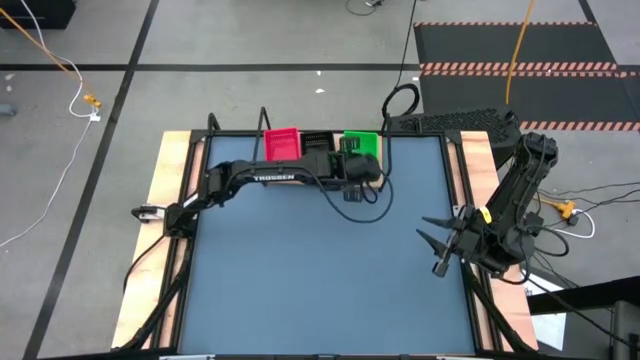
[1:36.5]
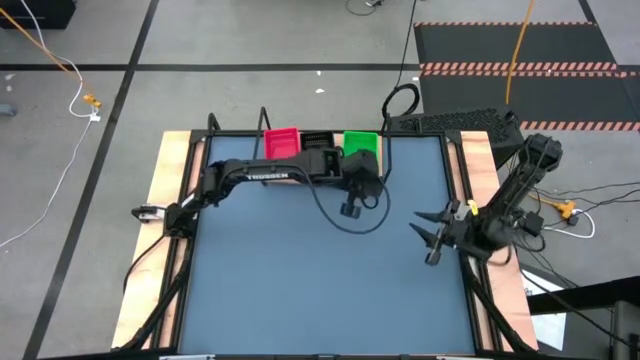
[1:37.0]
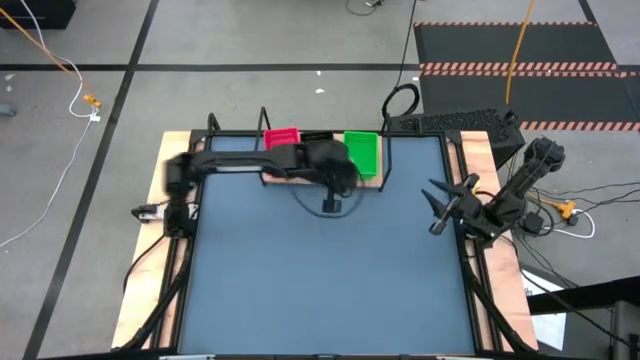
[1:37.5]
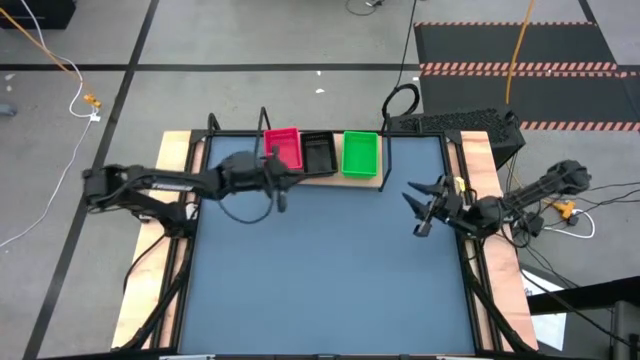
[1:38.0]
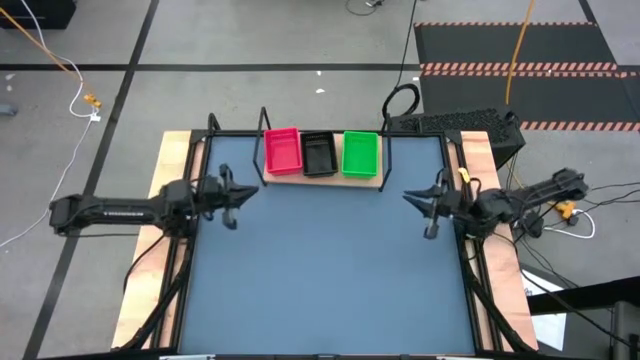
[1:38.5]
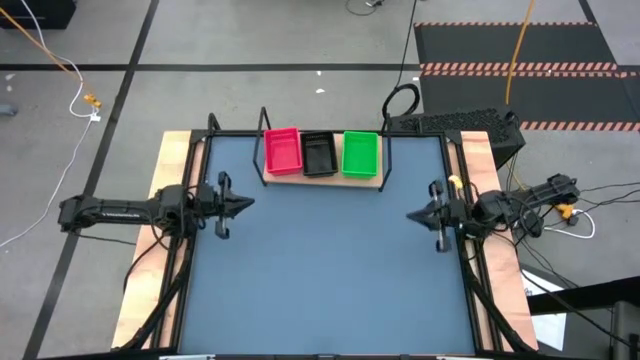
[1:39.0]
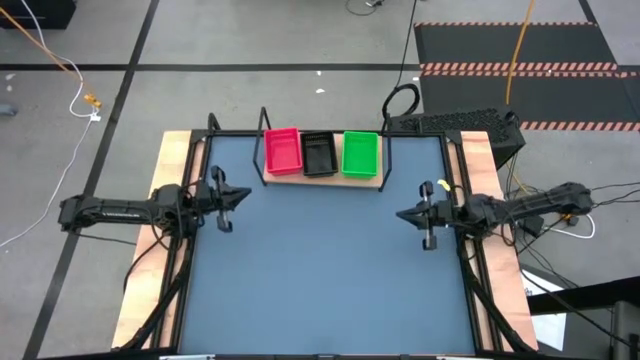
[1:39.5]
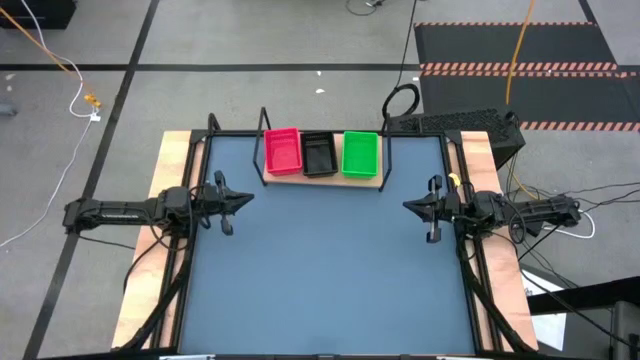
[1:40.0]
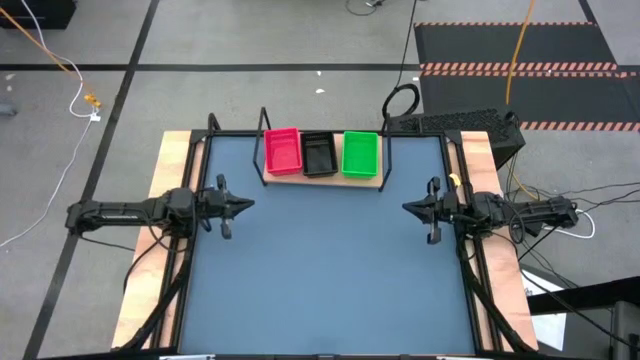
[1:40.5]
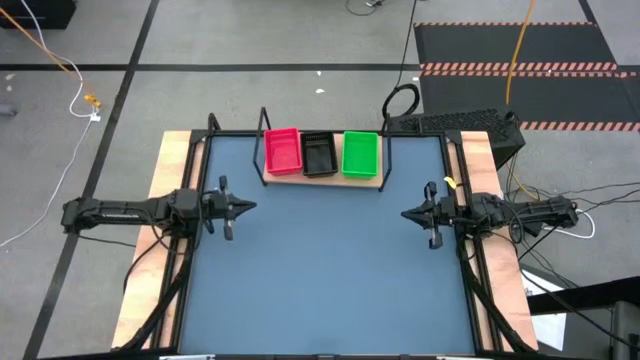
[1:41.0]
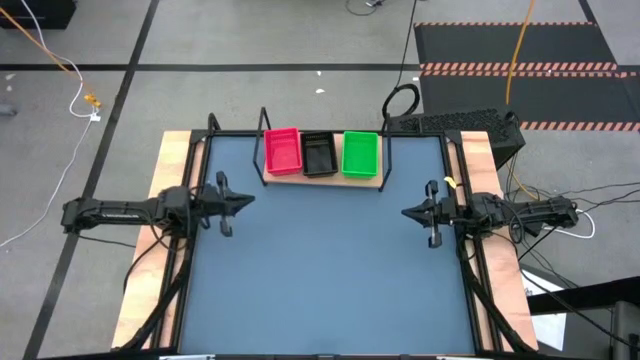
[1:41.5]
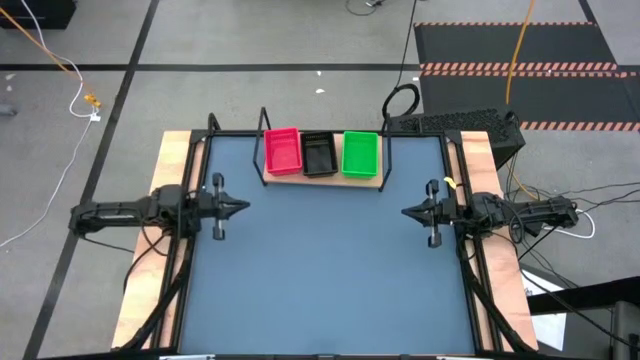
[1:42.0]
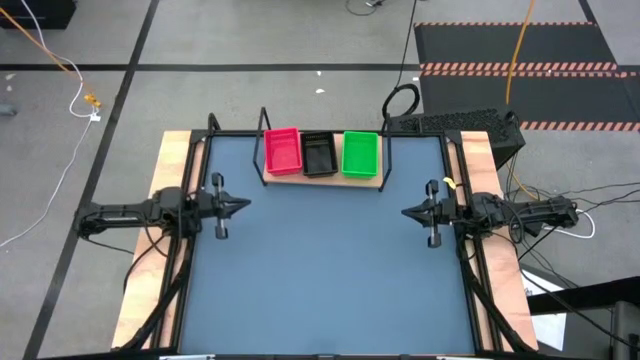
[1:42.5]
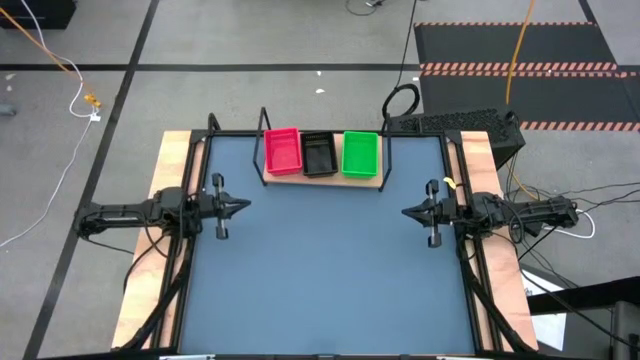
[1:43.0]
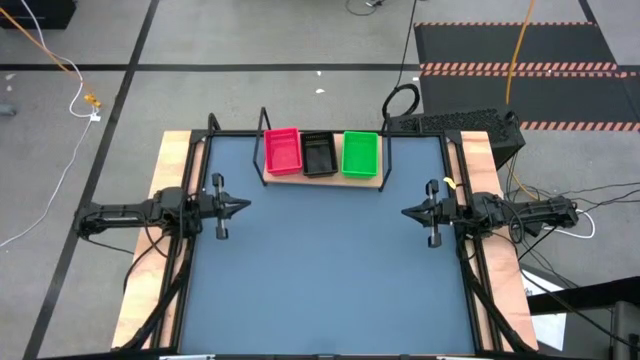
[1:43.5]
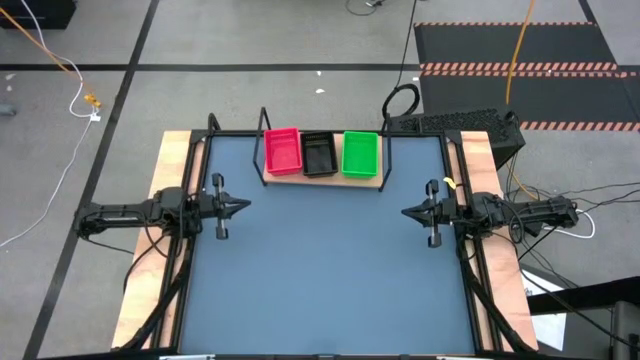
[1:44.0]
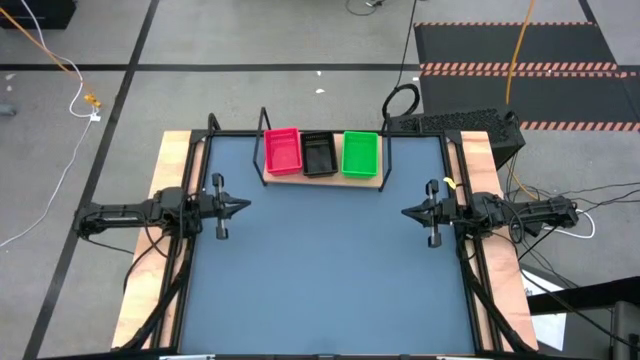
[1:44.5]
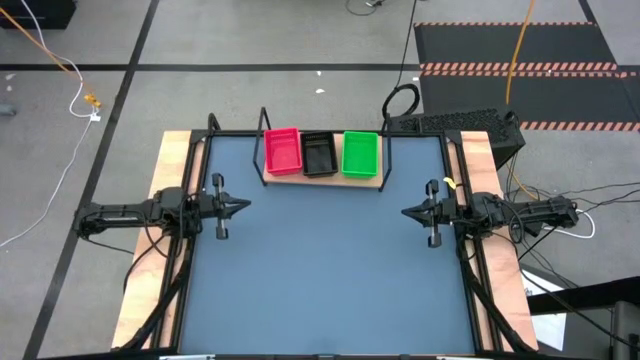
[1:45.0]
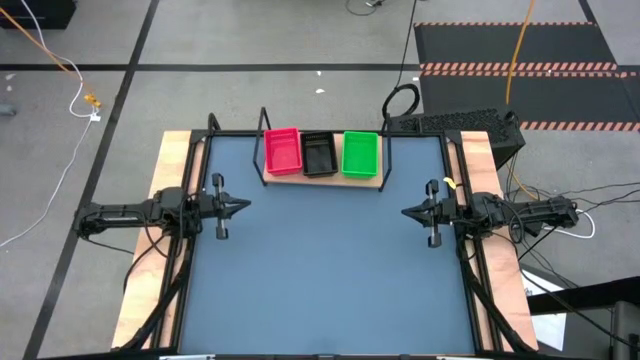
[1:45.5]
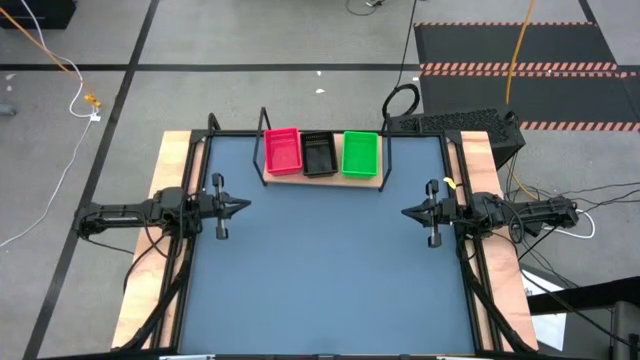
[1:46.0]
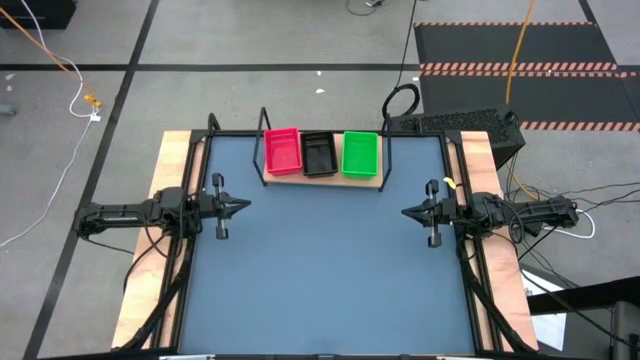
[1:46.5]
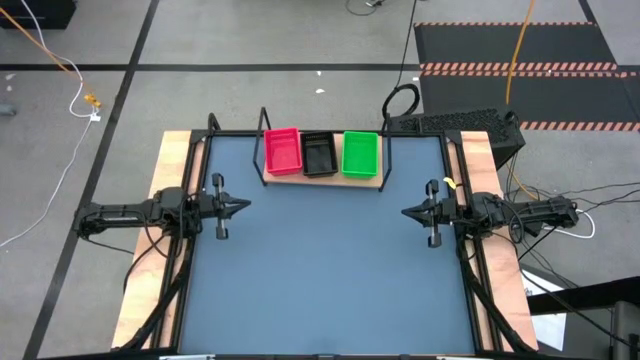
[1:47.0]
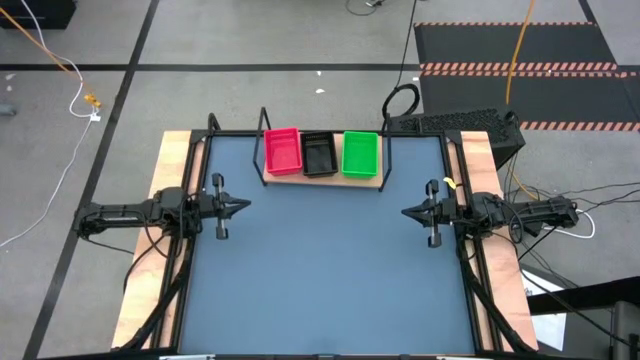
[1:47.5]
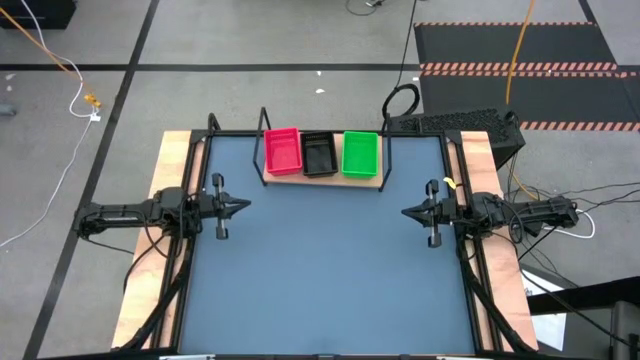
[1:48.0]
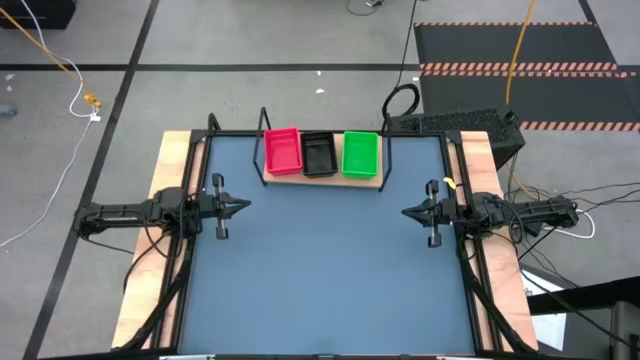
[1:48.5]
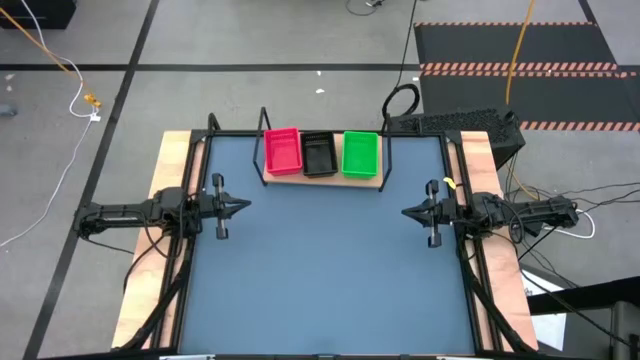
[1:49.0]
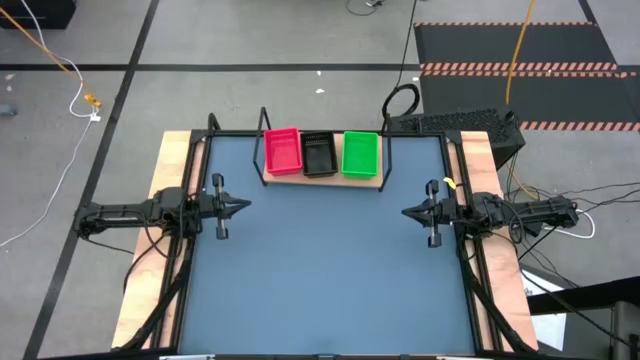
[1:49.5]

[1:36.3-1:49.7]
Task: Stack baskets on shelf by color
Return to Home Position

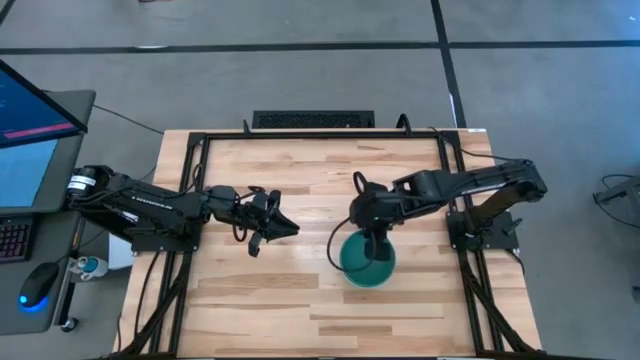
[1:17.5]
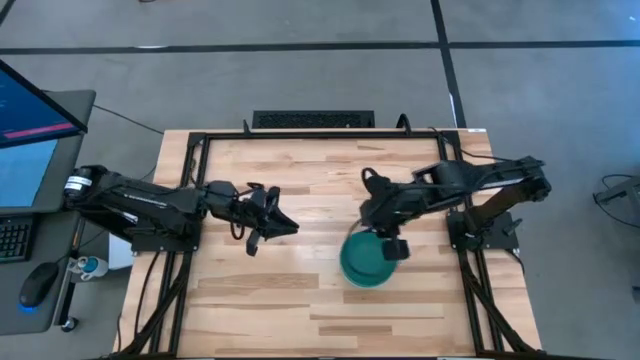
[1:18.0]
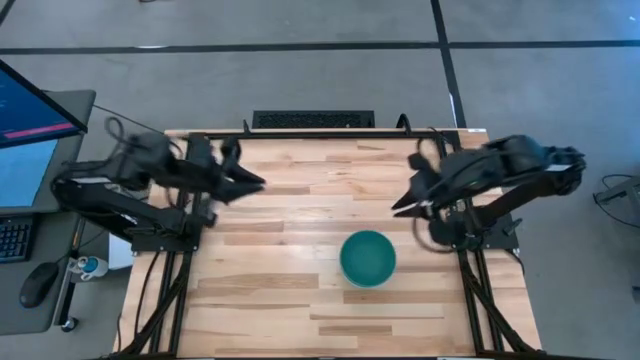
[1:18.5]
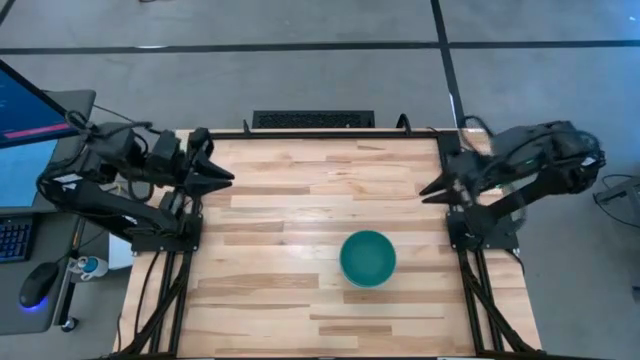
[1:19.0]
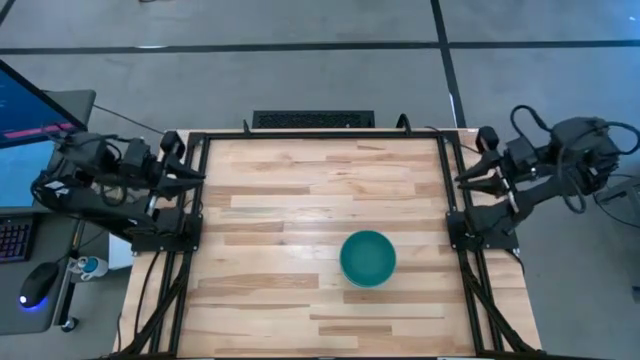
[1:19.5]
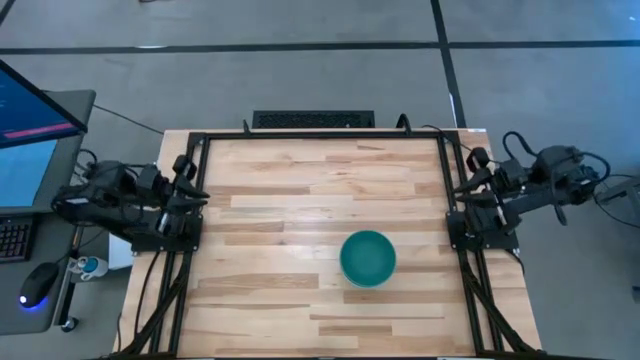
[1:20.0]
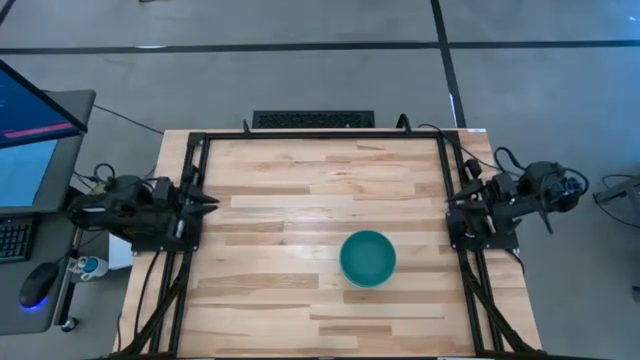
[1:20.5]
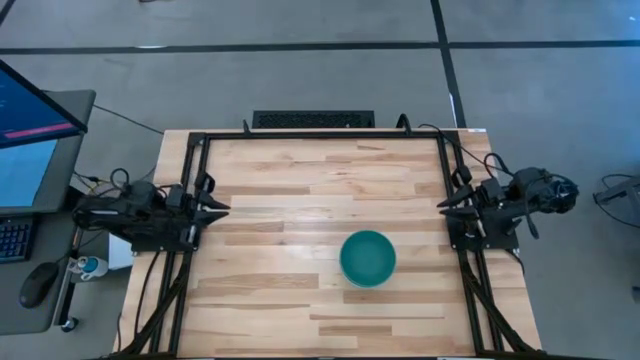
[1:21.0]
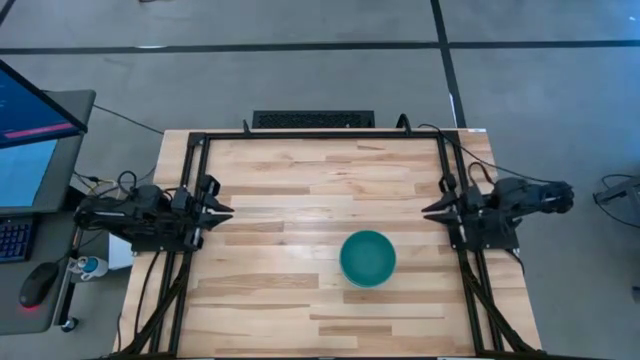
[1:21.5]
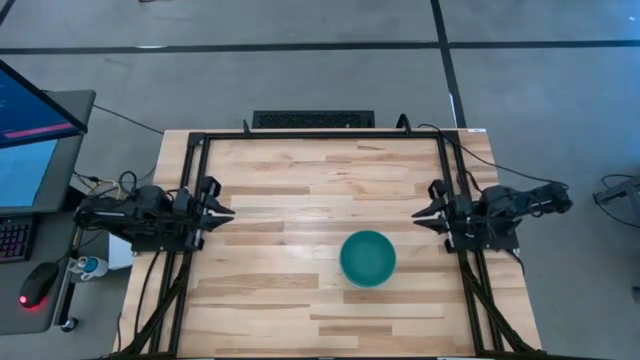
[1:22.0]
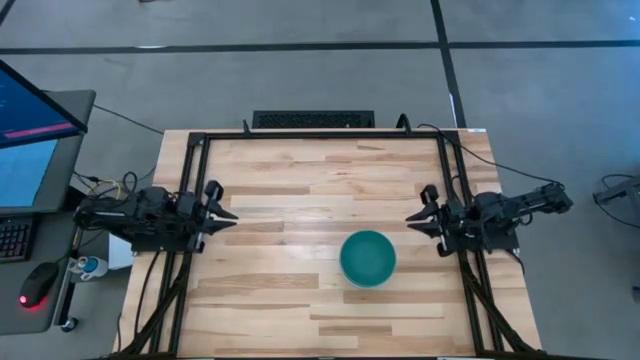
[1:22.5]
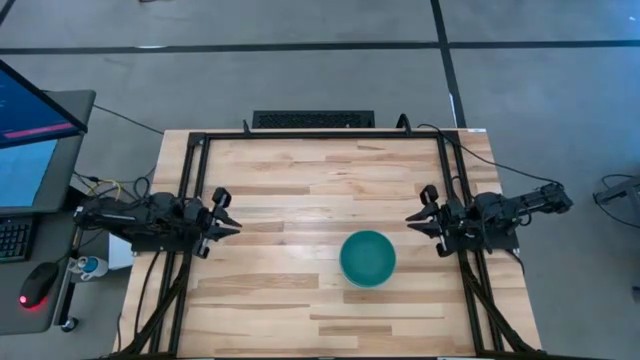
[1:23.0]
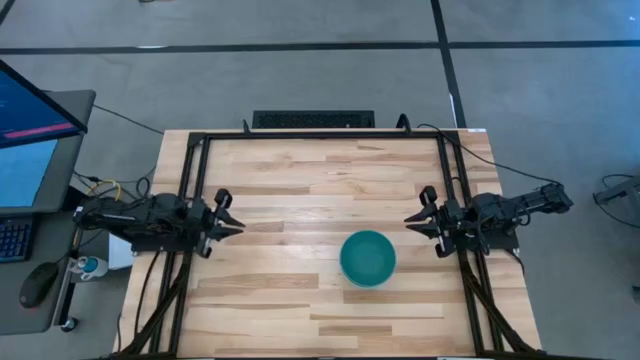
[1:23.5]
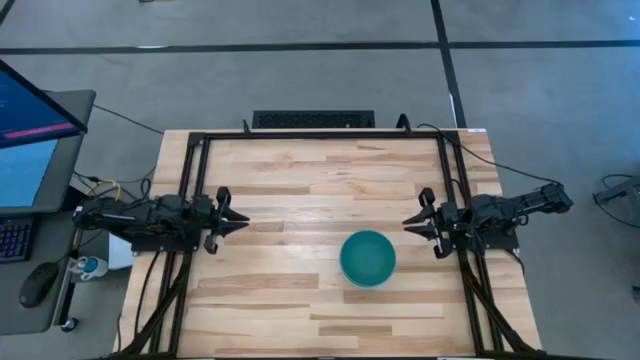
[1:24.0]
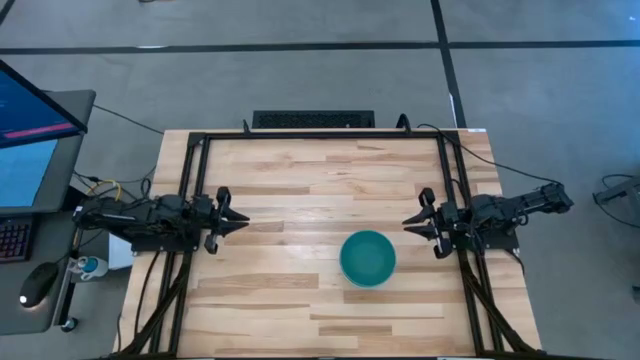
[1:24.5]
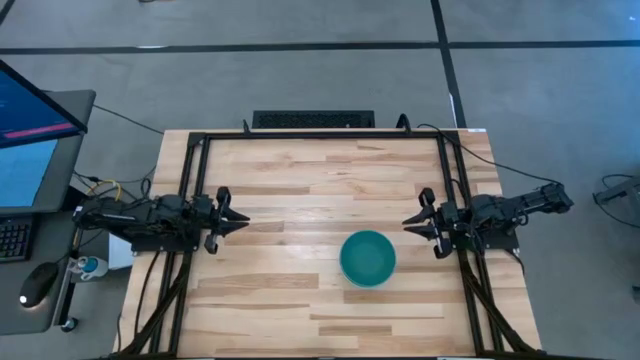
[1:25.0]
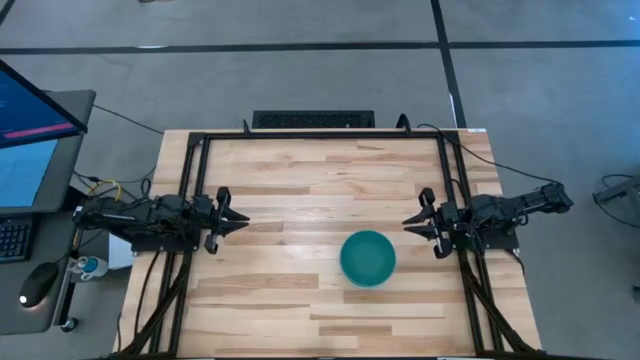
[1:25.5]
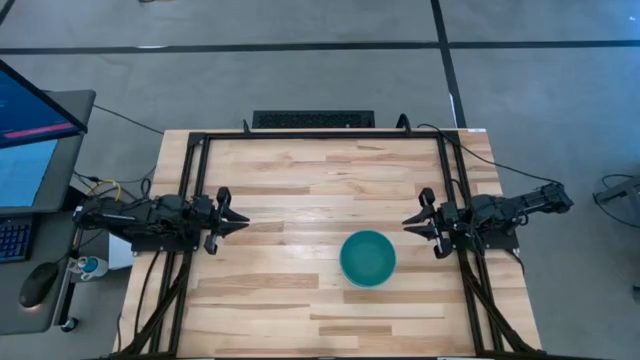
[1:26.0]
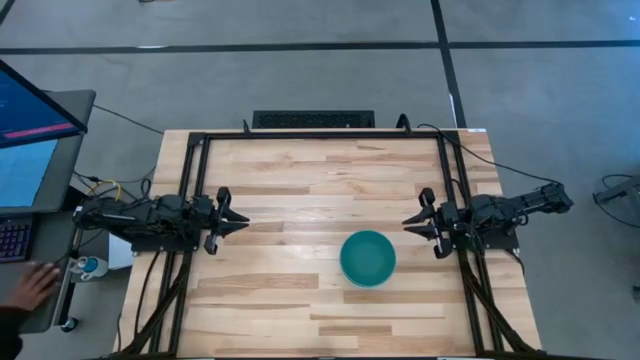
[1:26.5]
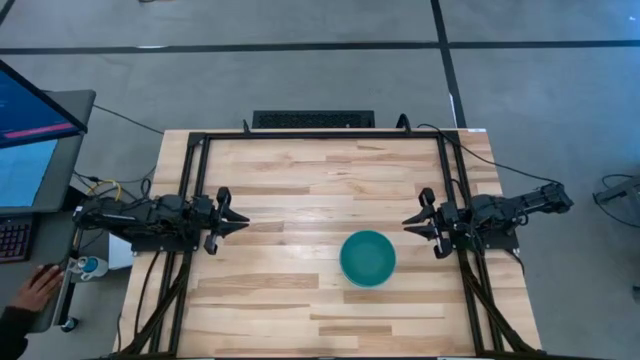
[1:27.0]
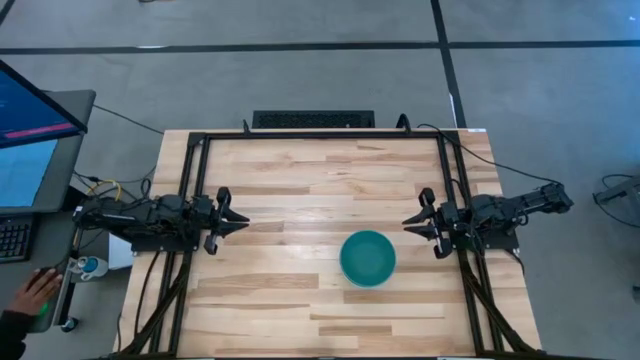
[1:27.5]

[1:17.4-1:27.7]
Task: Nest bowls inside each other
Return to Home Position
